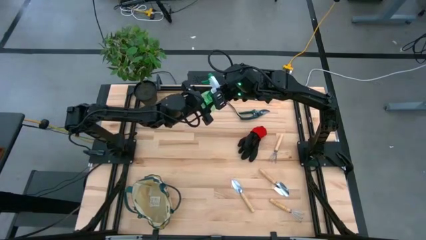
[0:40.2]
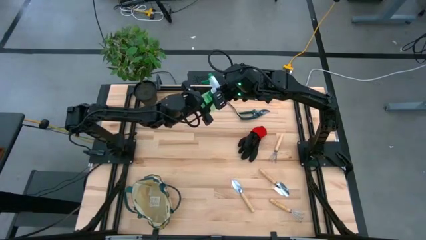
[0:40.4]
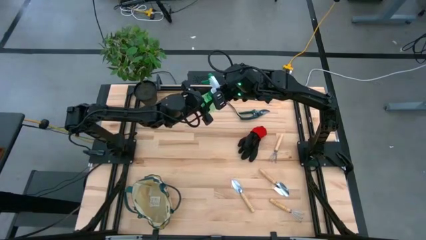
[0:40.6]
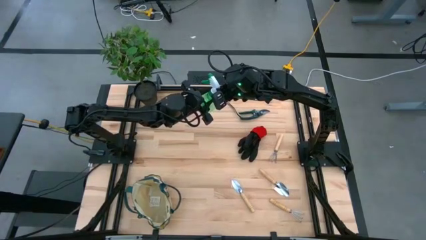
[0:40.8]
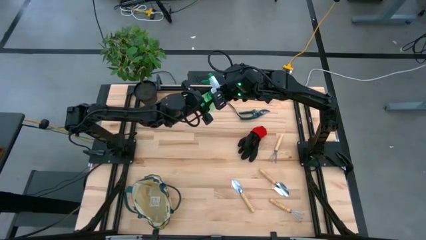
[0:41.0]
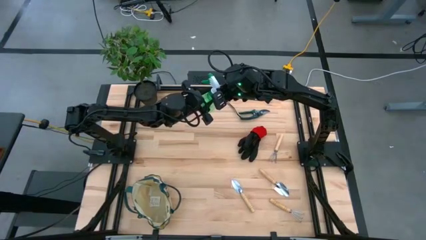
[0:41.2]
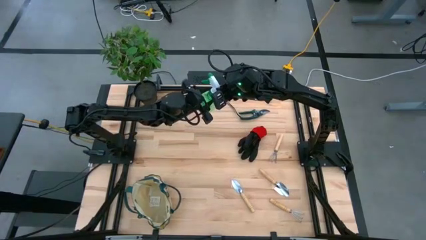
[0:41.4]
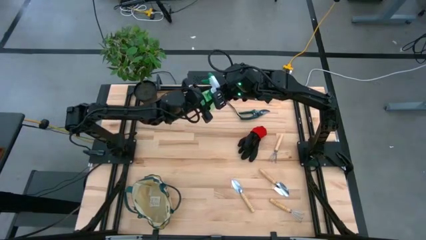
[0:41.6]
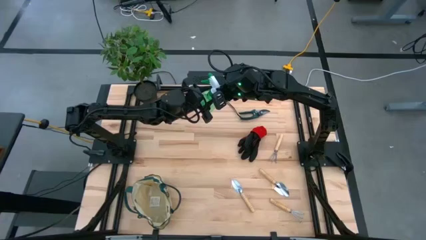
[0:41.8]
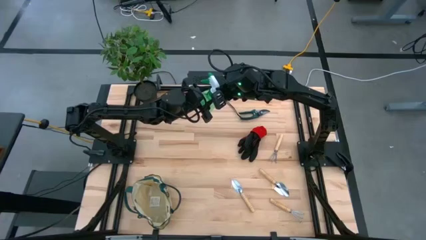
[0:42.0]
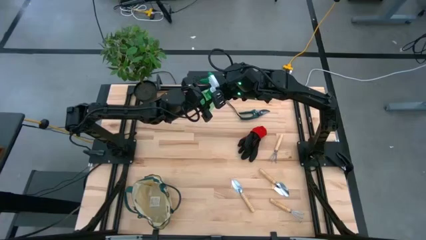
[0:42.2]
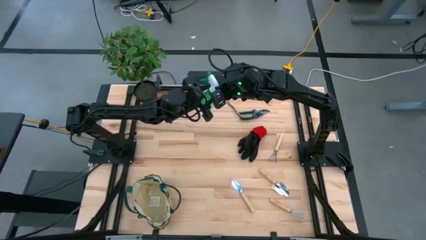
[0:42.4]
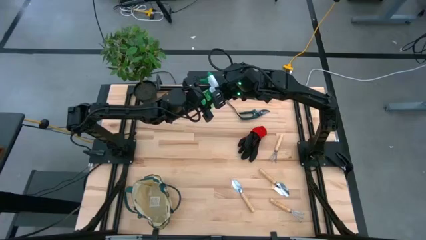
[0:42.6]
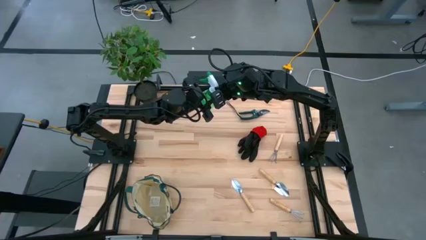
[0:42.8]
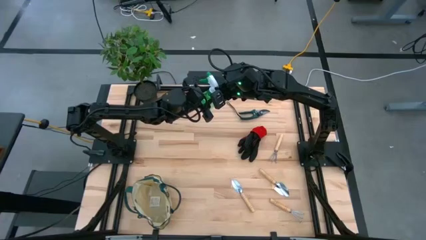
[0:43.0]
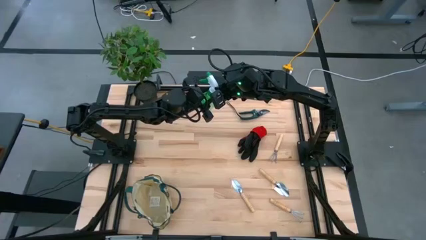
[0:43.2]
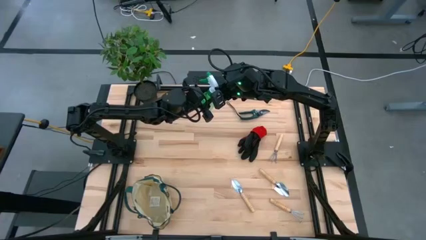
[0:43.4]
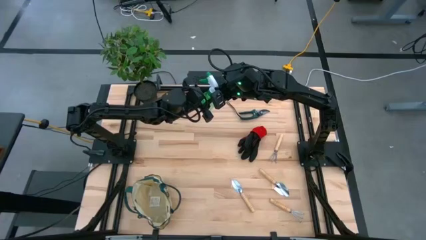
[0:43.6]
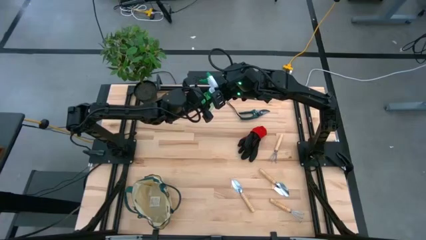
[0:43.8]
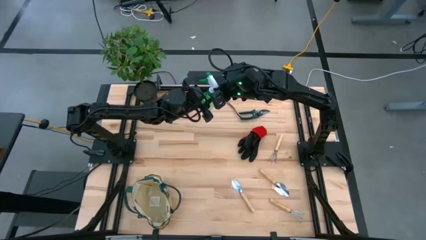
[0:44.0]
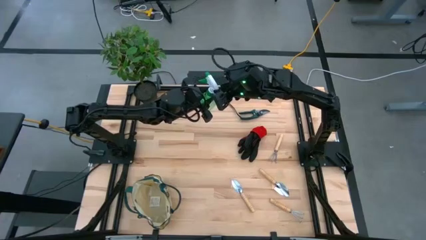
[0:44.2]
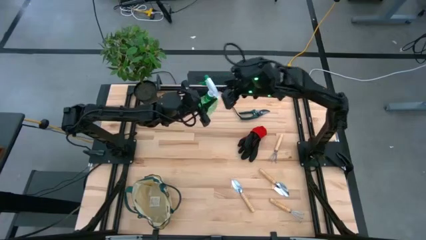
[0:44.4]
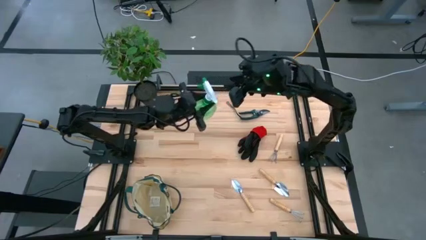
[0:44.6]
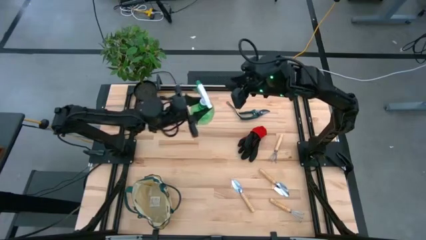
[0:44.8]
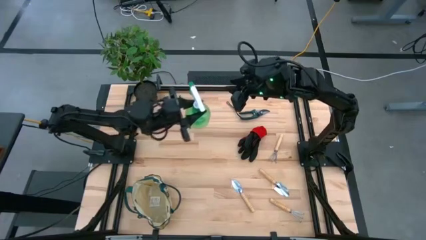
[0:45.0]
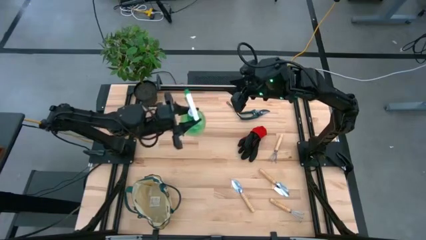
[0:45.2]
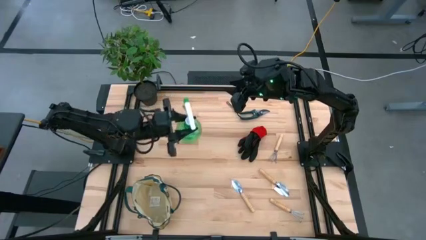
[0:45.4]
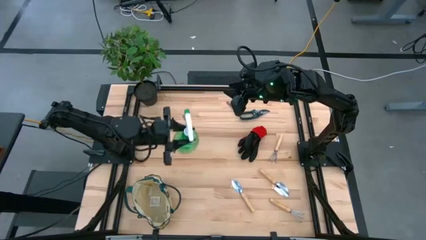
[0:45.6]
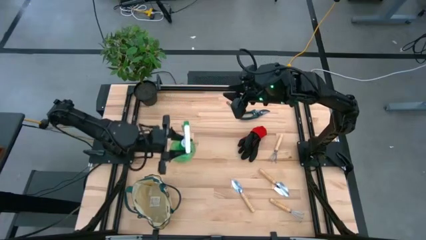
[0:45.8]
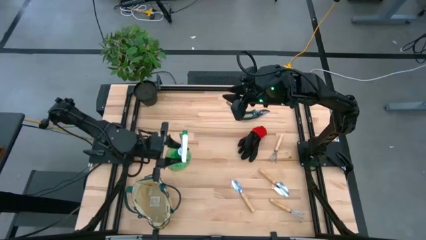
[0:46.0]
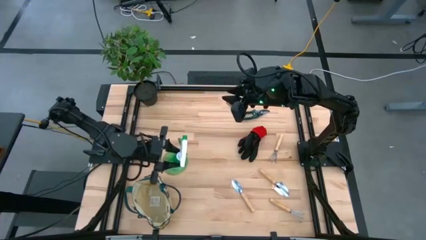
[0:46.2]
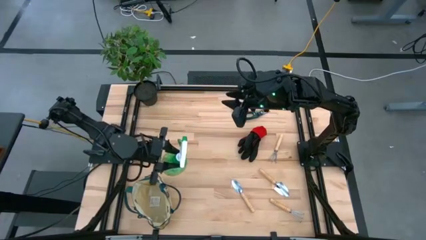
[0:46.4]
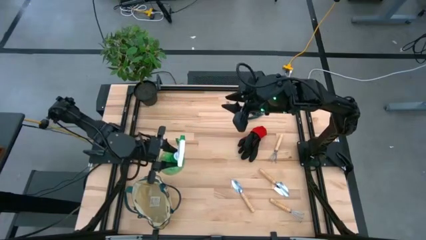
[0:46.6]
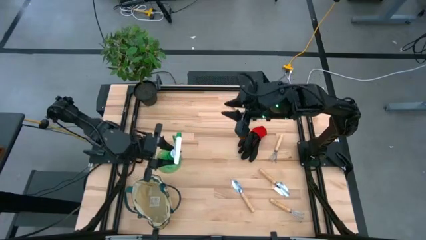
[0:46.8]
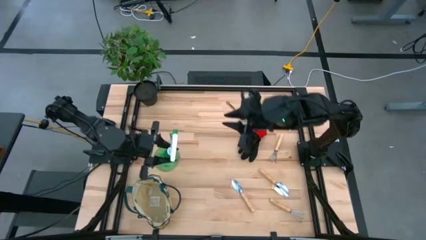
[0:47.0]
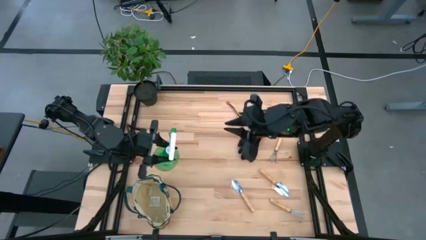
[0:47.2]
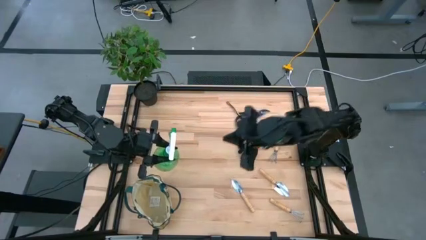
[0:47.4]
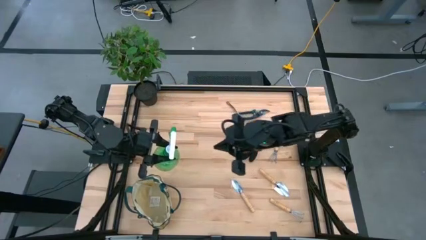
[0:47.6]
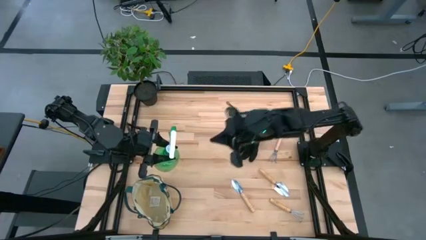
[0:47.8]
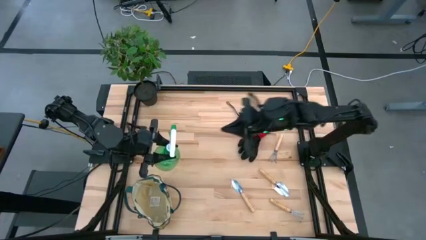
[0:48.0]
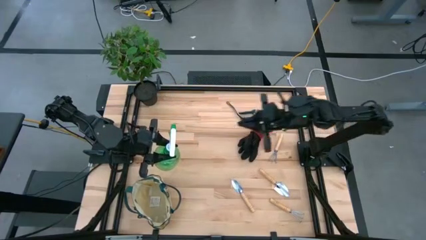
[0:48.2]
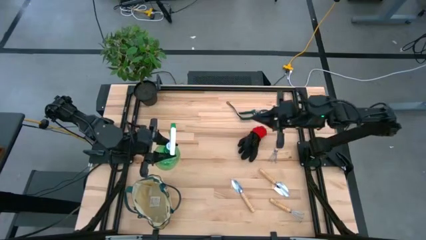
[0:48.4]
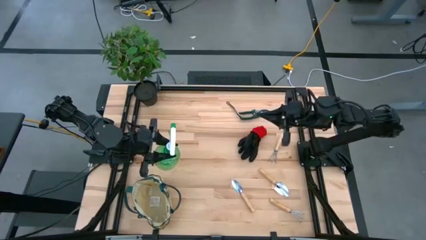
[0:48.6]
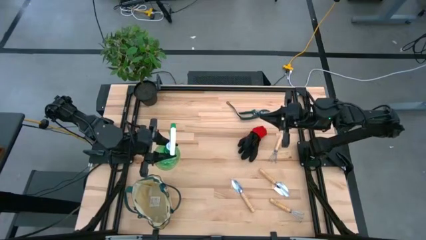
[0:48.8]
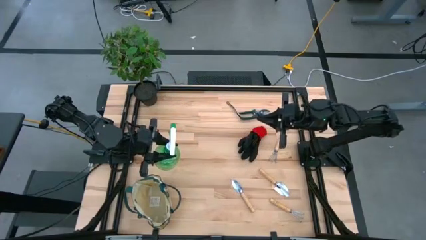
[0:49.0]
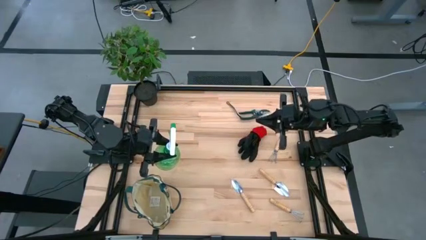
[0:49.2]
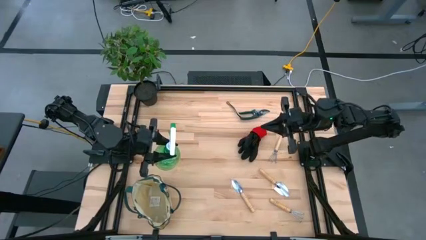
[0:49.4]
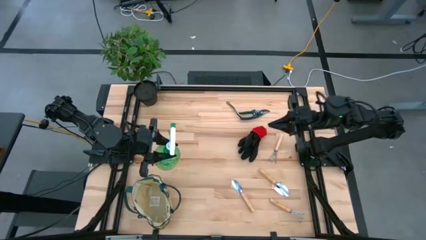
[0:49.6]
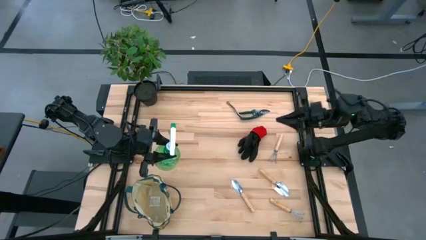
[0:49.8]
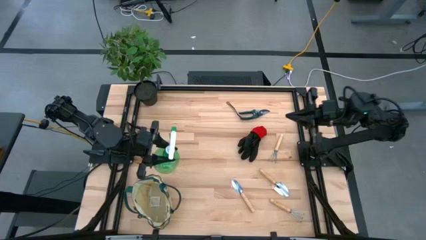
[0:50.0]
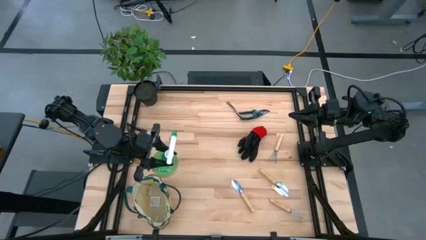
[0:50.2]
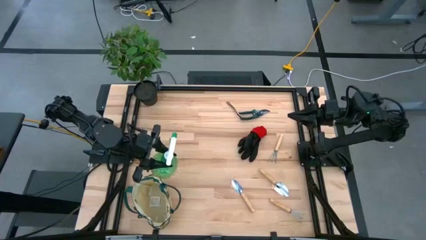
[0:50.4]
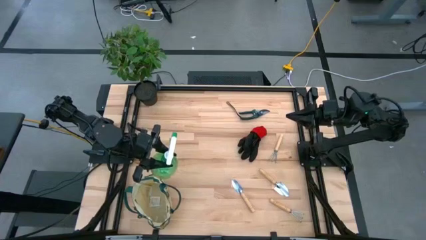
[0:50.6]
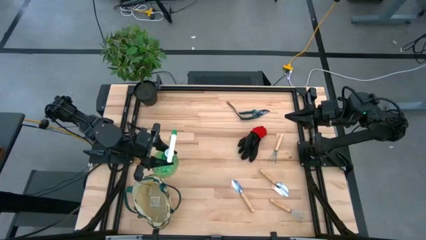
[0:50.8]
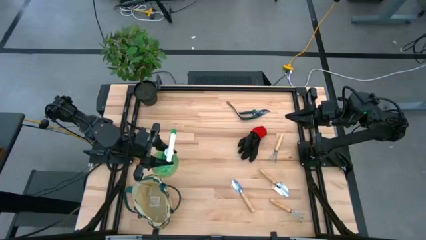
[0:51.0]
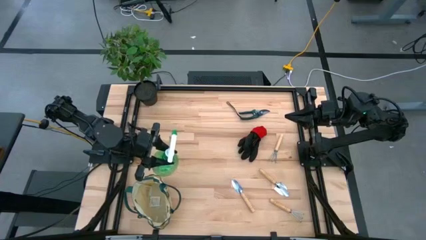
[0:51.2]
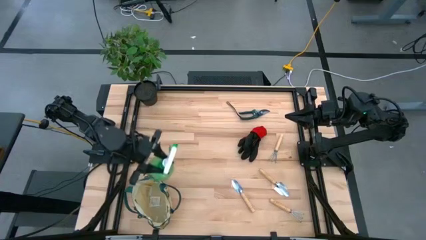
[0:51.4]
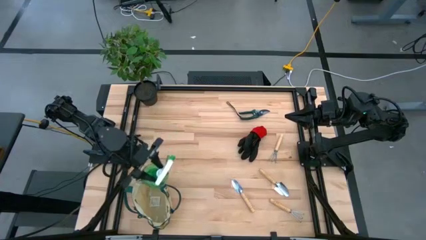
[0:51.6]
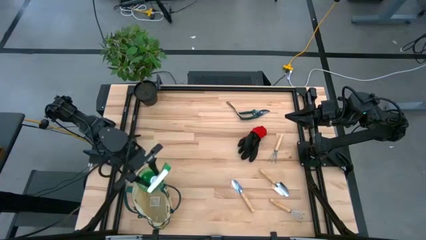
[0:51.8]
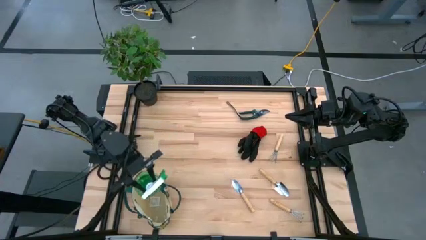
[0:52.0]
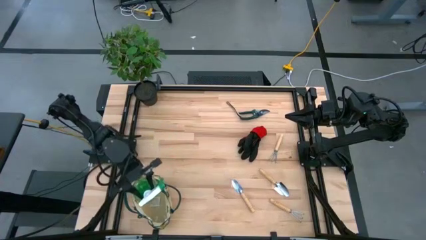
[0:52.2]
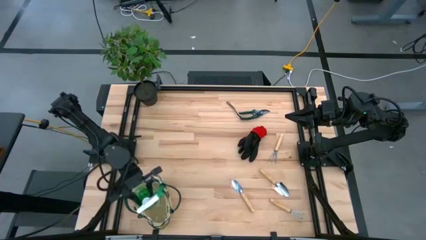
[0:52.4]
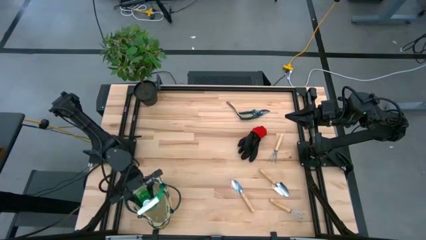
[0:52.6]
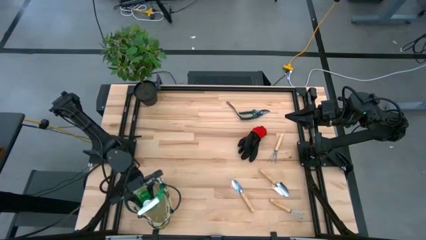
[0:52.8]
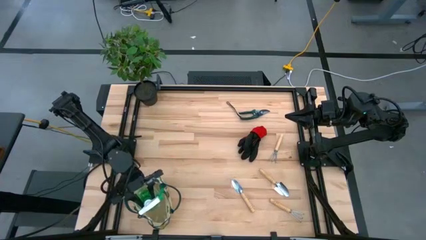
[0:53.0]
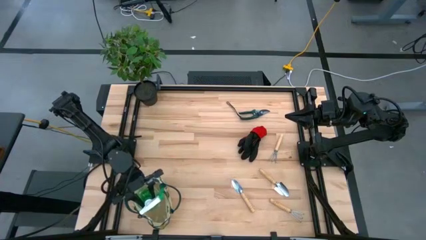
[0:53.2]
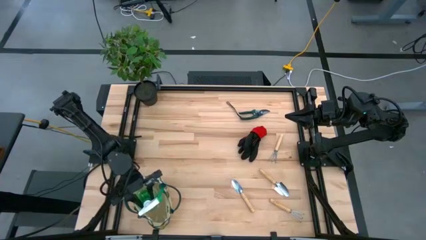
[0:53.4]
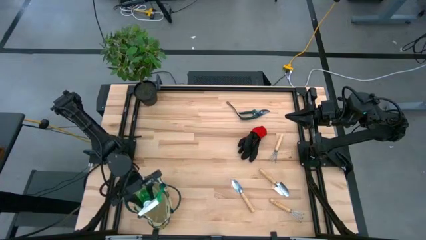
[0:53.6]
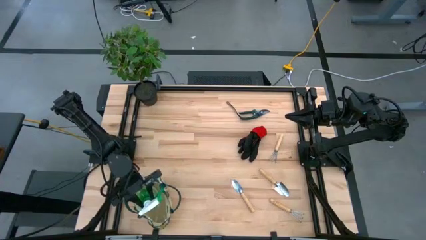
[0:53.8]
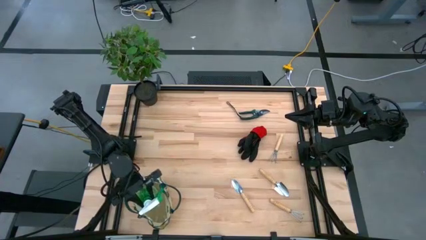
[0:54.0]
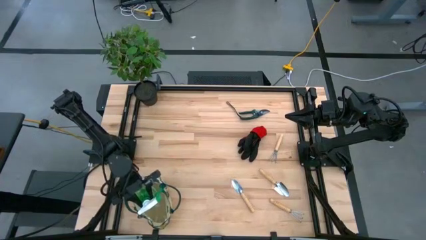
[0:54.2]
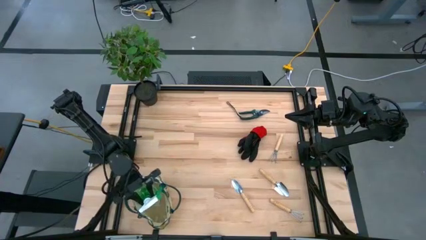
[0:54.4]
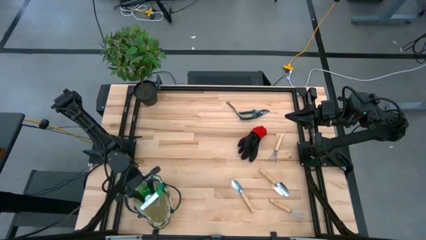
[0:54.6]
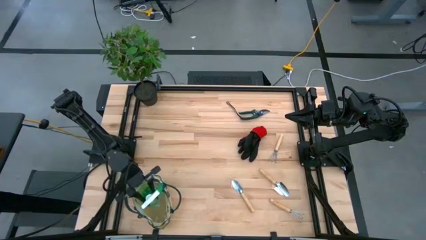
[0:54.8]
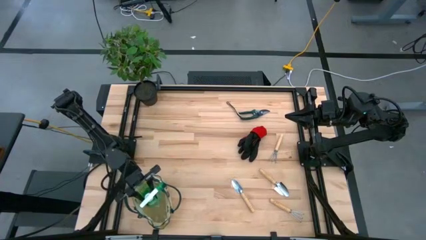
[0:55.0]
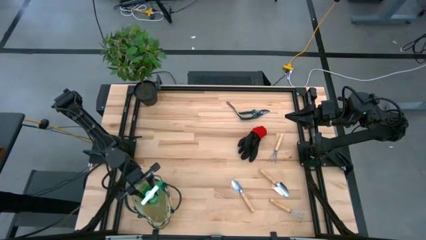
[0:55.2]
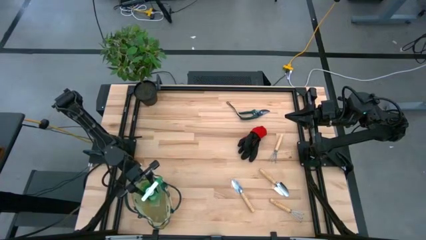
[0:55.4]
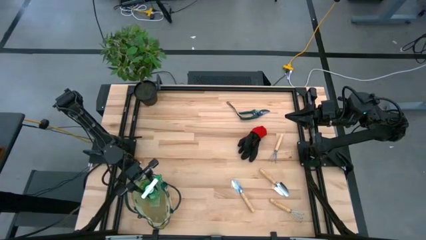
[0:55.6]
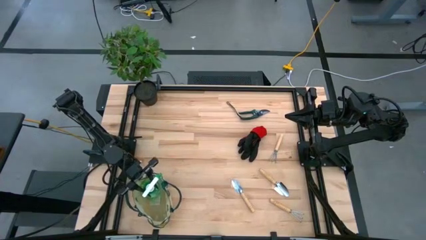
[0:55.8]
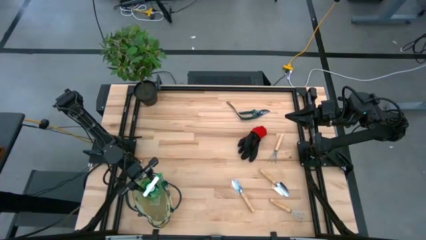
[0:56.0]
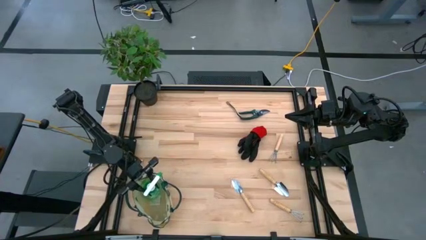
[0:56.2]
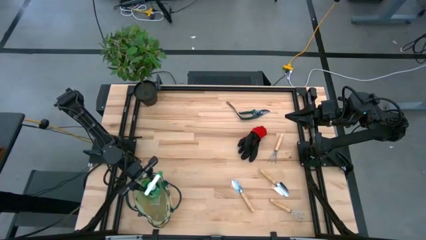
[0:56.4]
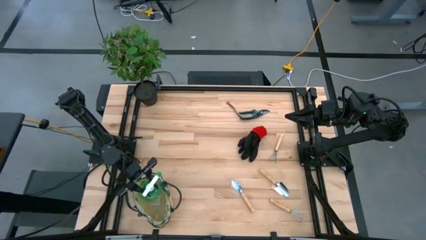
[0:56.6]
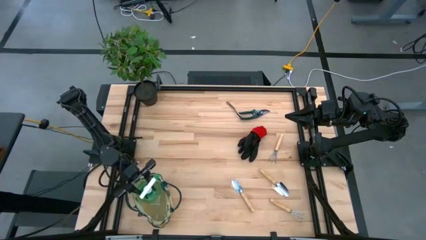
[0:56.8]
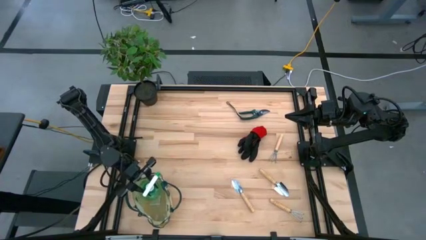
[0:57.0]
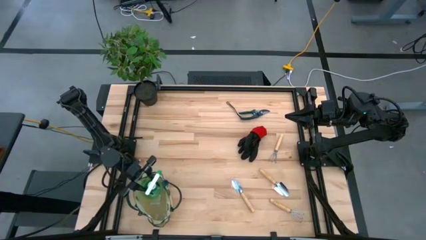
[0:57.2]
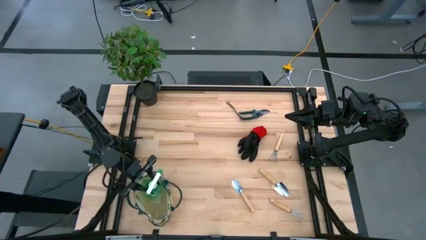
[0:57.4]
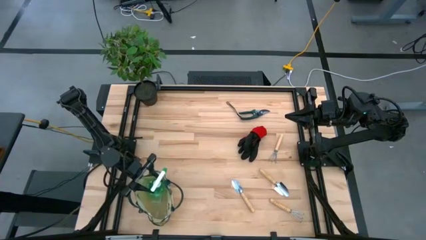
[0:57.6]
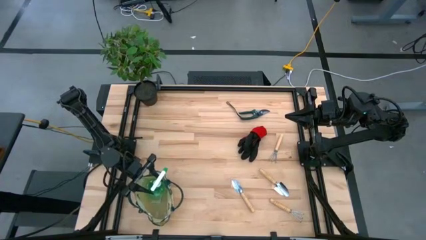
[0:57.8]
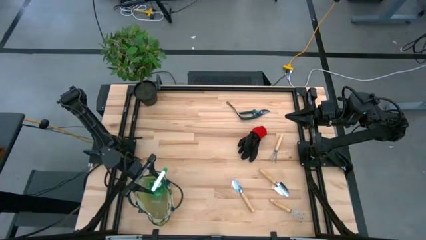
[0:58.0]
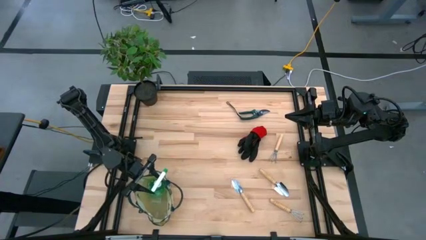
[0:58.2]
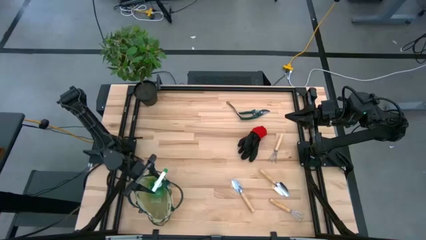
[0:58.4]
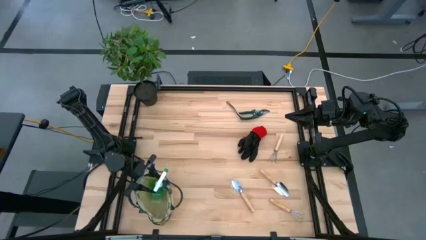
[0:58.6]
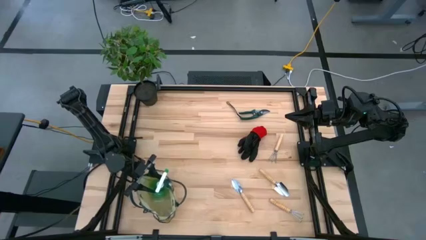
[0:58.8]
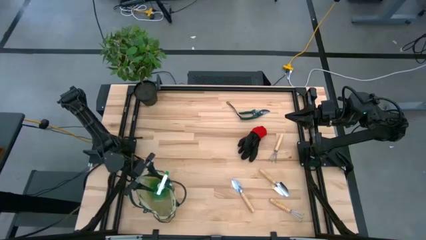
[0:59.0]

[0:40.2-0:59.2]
Task: Pick & Place Garden tools in Gardening bag
Put the spray bottle into the gardening bag
